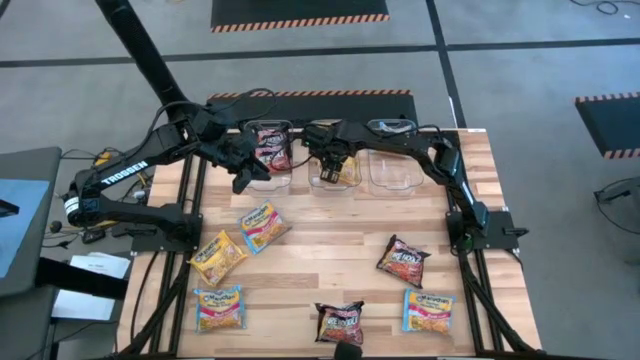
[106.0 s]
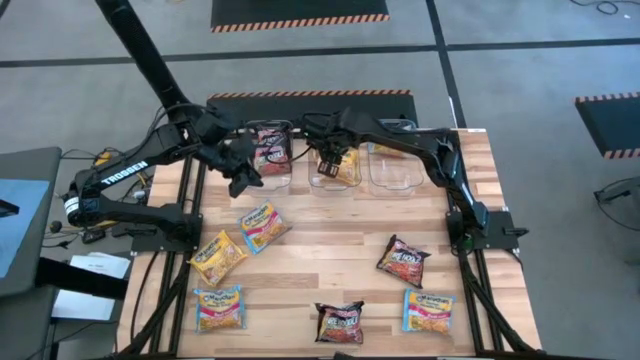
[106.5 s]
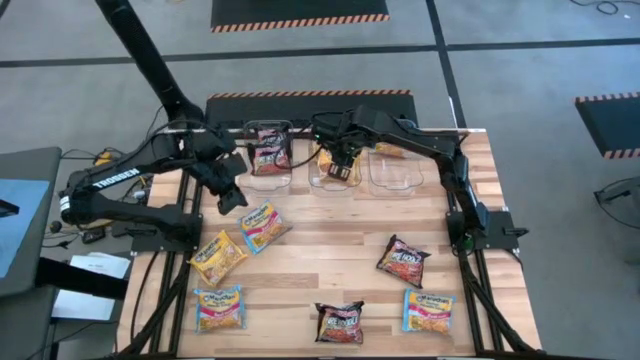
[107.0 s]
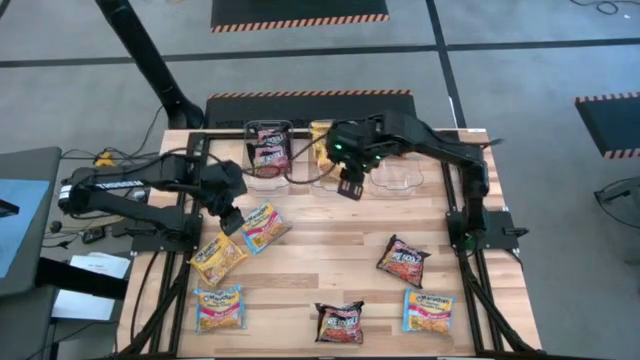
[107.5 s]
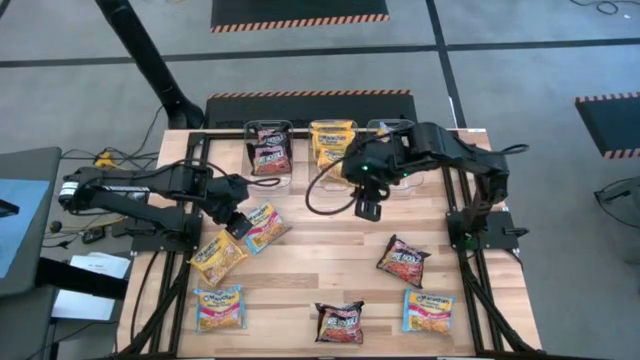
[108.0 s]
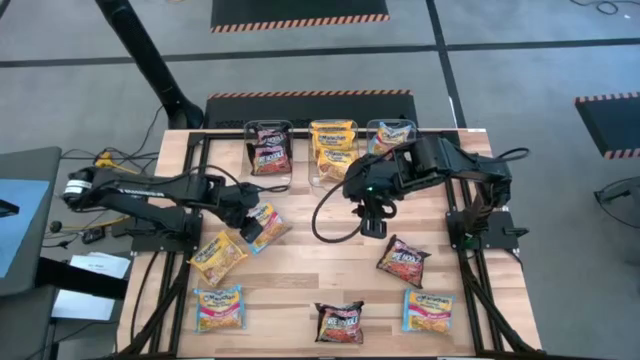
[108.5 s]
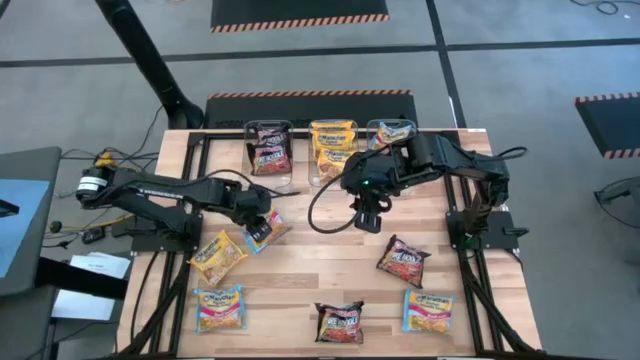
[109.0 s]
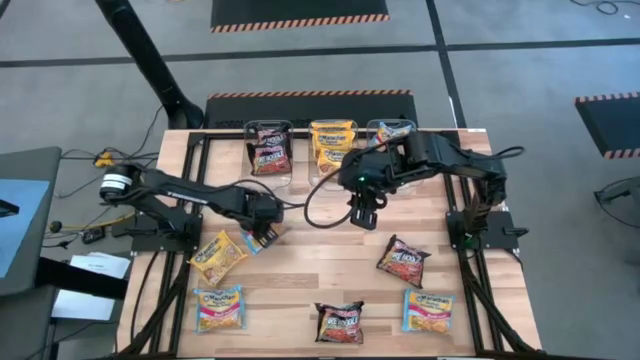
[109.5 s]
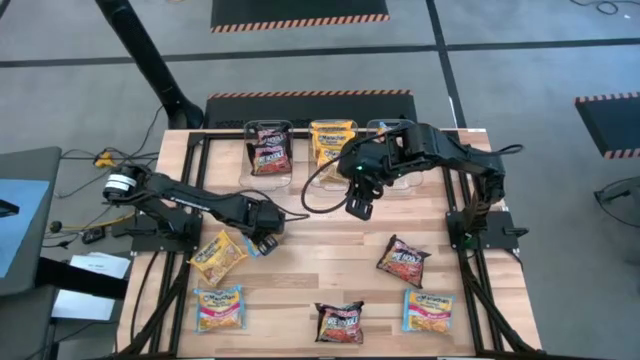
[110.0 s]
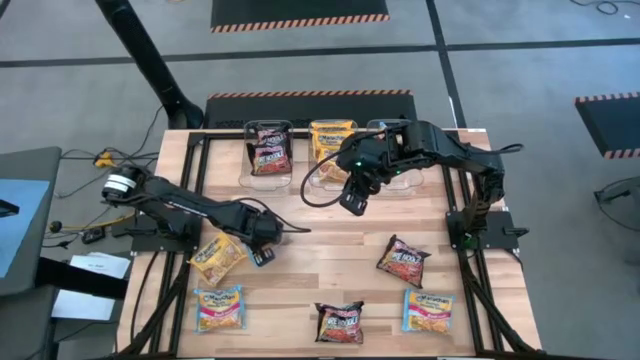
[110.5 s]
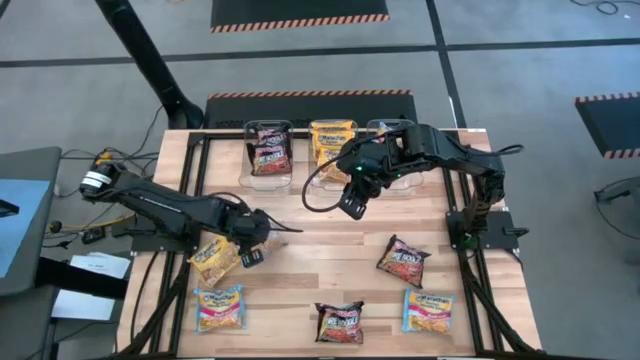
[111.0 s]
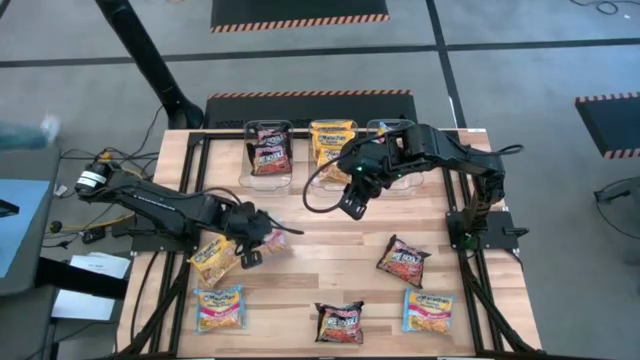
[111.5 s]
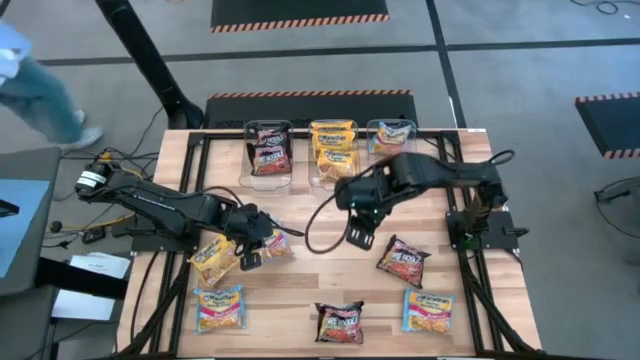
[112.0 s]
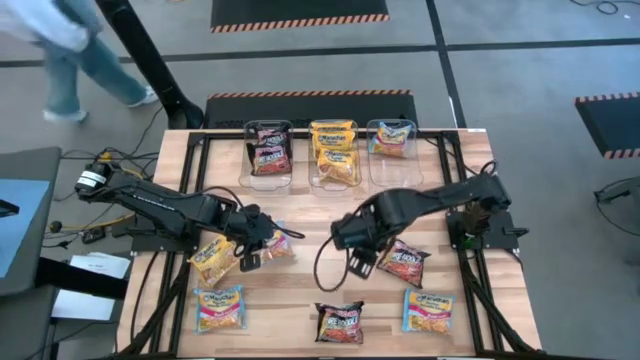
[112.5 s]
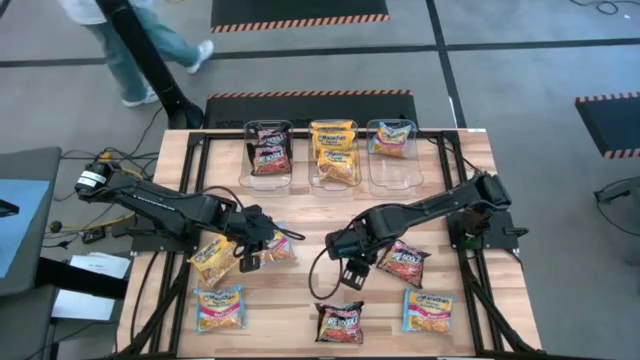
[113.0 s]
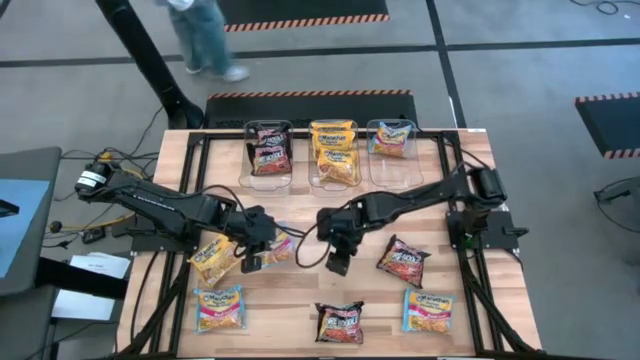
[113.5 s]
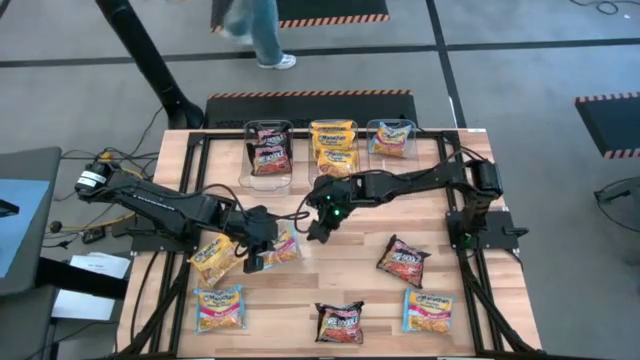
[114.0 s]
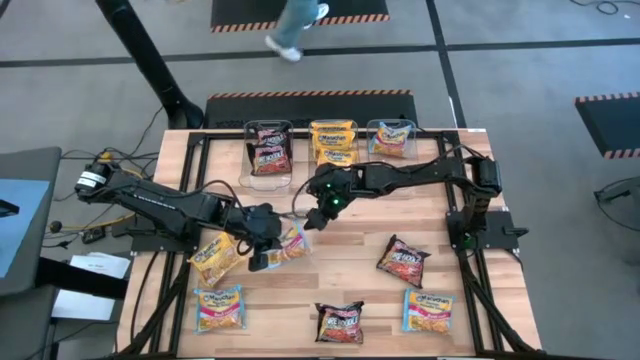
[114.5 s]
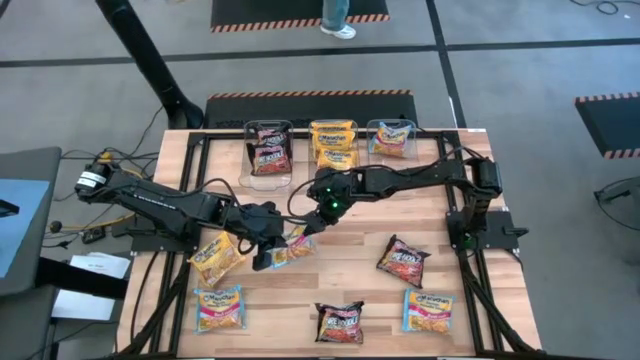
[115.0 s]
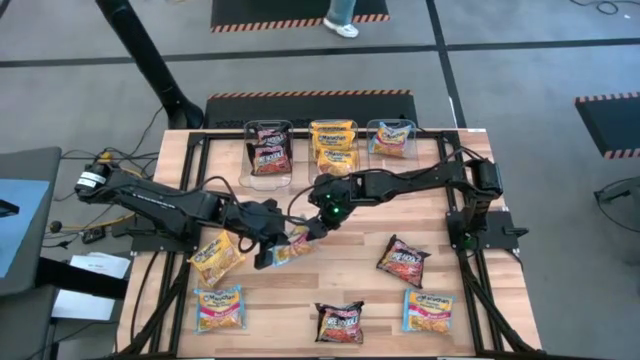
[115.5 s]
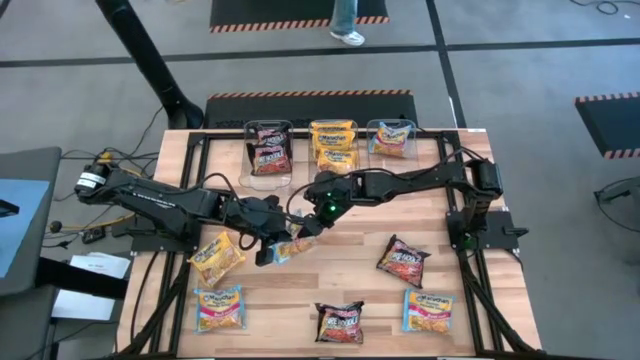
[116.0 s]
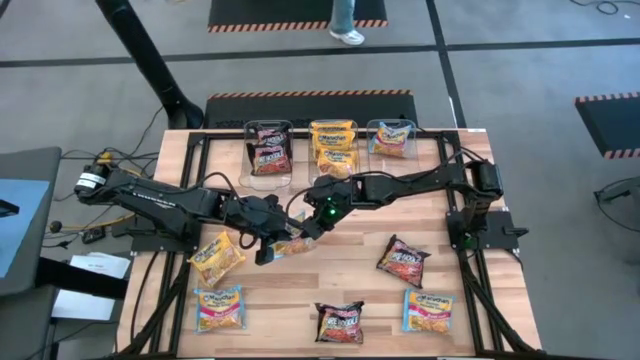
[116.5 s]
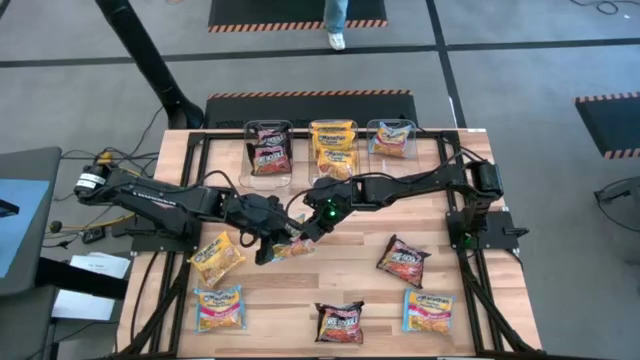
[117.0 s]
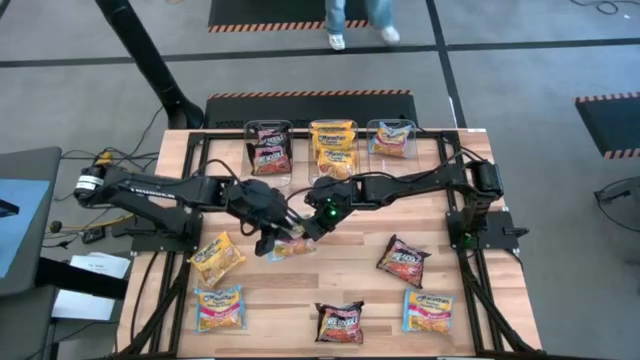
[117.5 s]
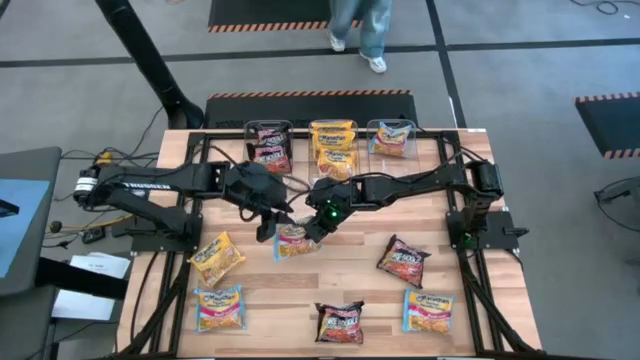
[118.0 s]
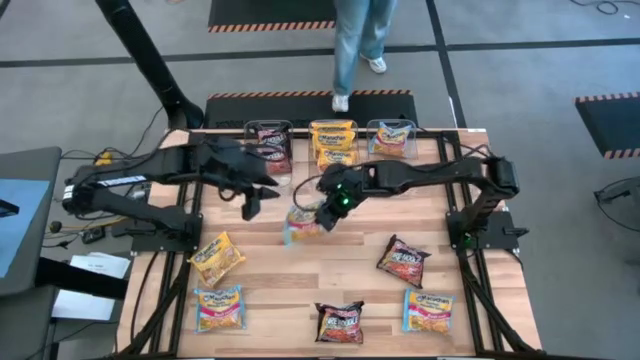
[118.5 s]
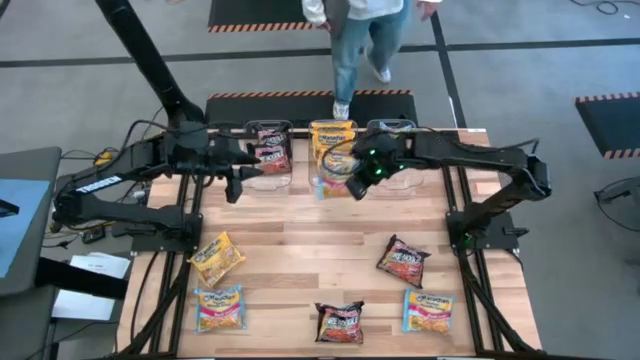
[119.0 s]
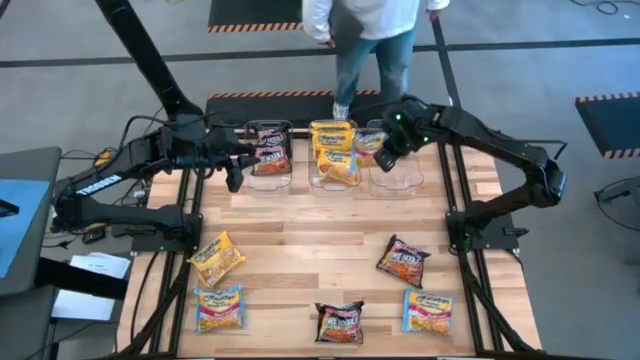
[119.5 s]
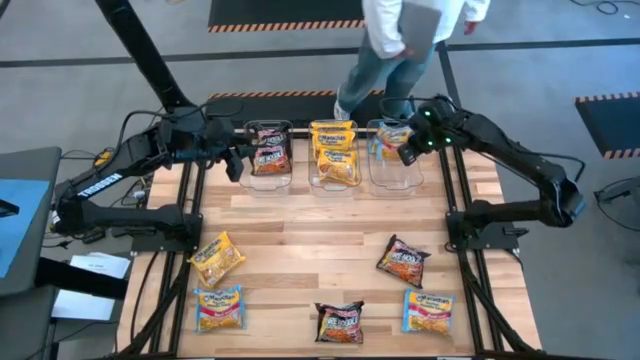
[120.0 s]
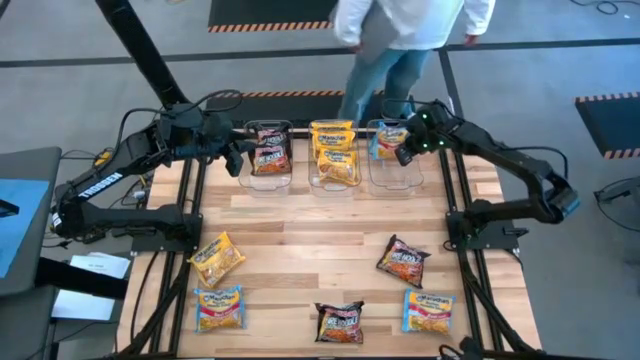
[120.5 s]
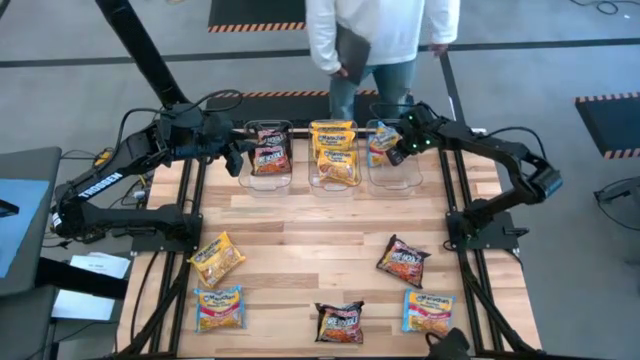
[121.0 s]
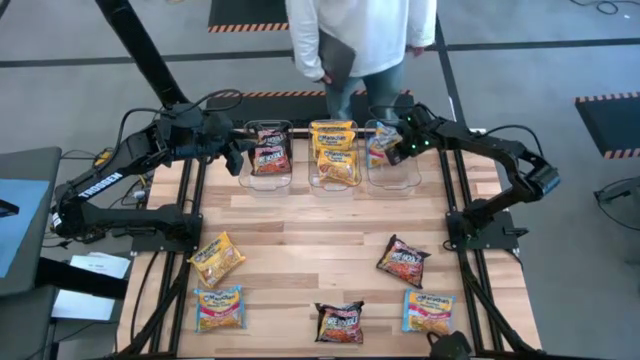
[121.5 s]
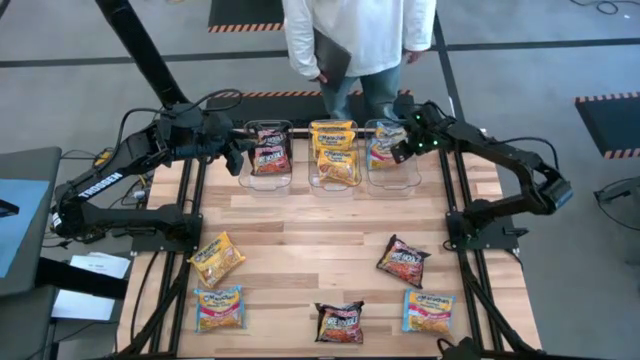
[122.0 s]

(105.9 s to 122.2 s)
Task: Sort Maruchan noodles
Put the blue noodle pack into the right transparent bin

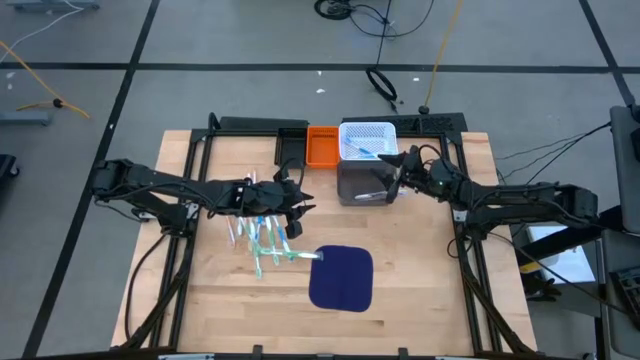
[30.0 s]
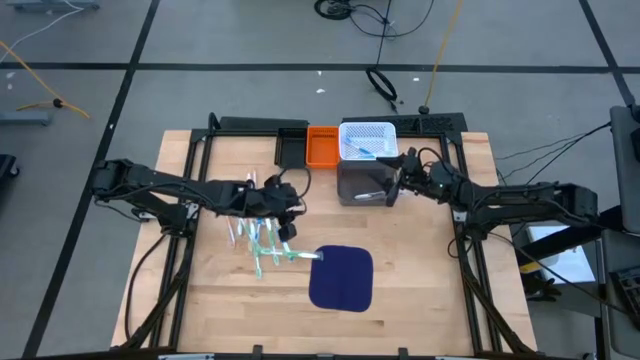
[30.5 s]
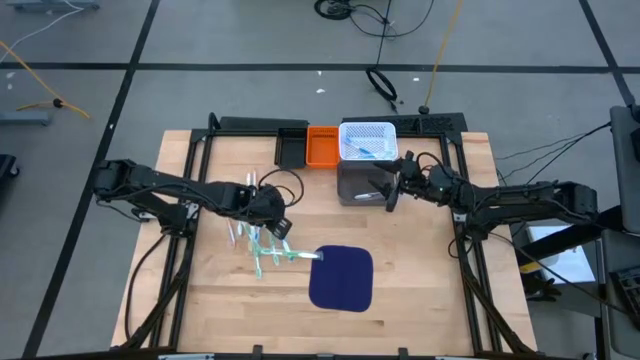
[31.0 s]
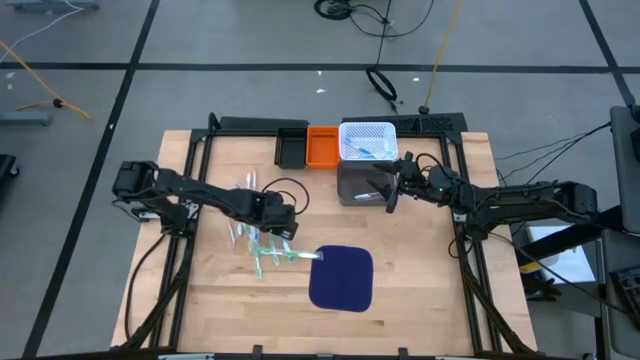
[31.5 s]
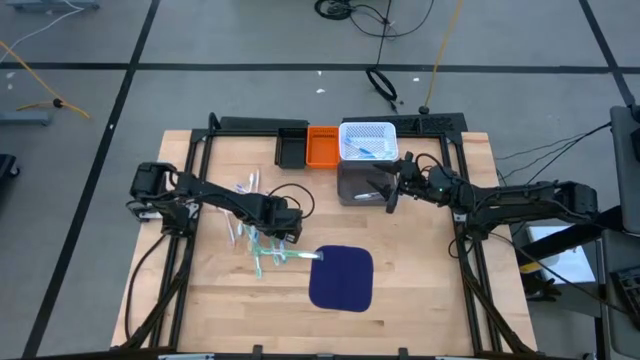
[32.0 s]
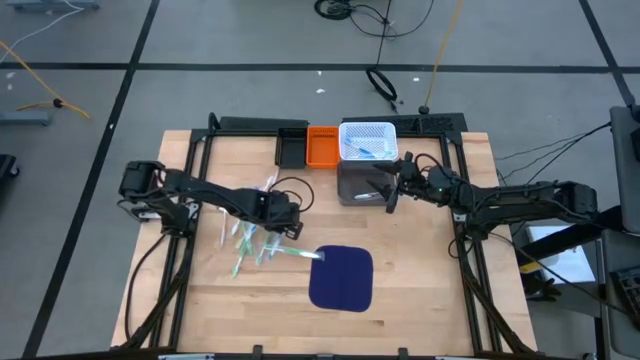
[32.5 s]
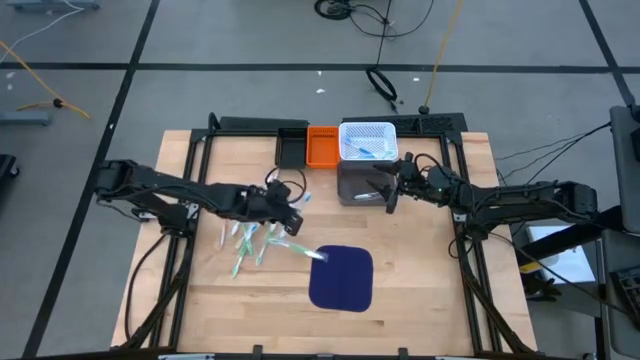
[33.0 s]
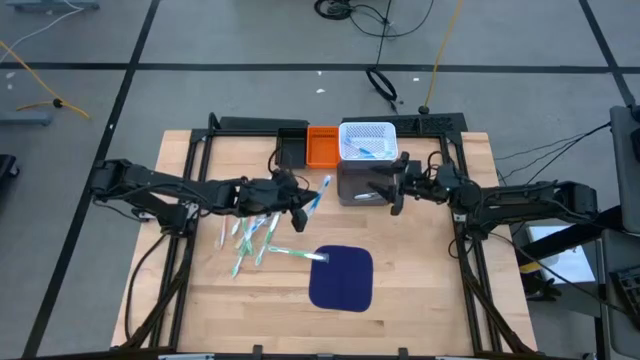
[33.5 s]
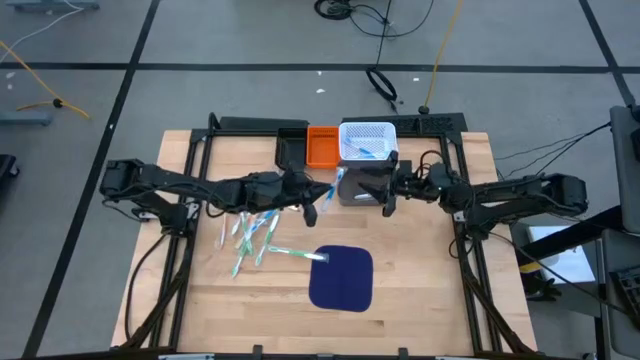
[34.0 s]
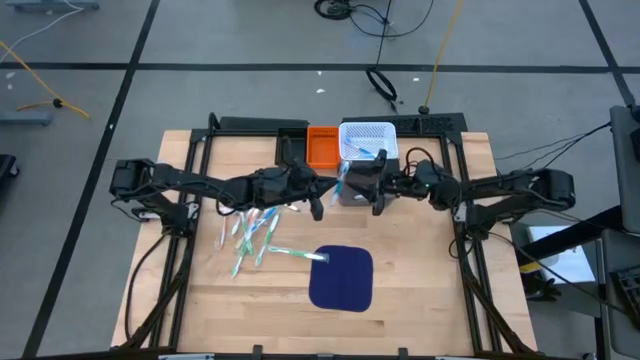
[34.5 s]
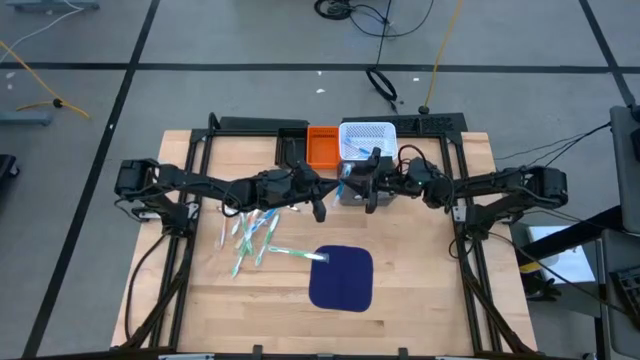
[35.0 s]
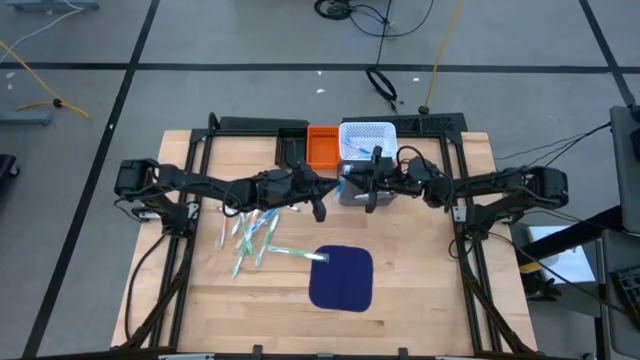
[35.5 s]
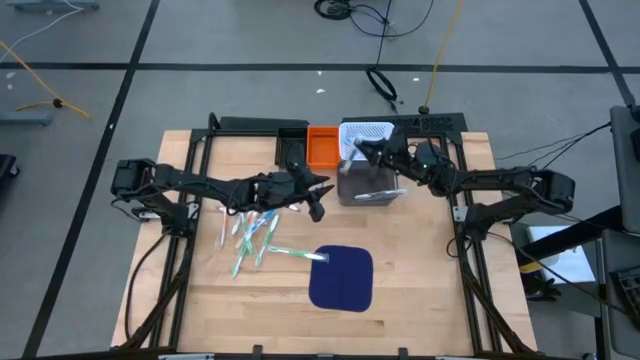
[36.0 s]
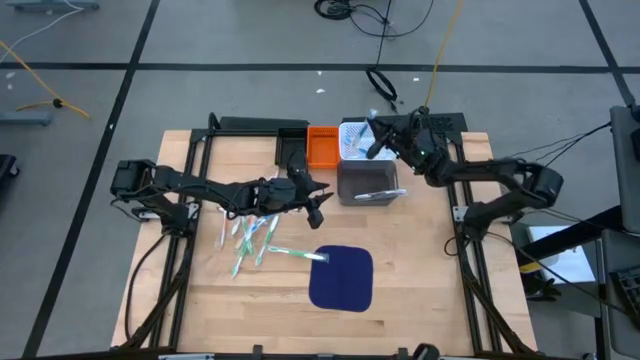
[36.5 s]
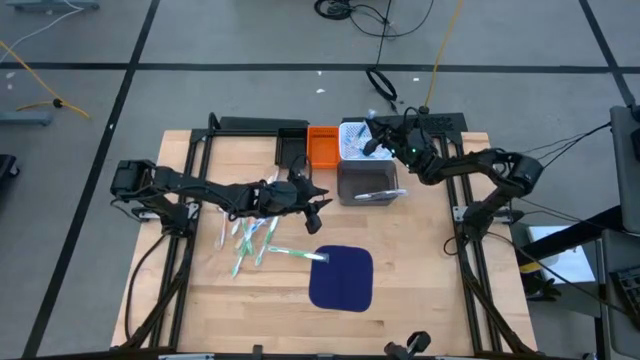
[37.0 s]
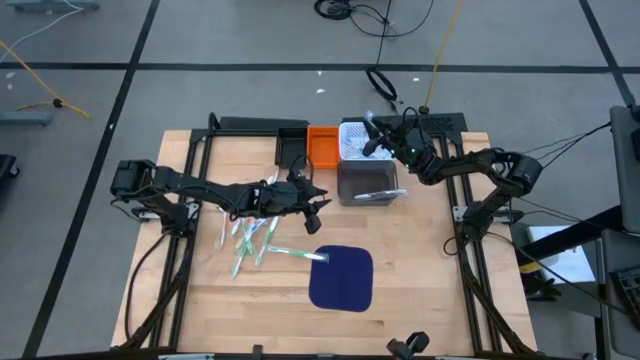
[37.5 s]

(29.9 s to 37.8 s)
Task: Pick & Place Toothbrushes
Put the blue toothbrush into the white basket
